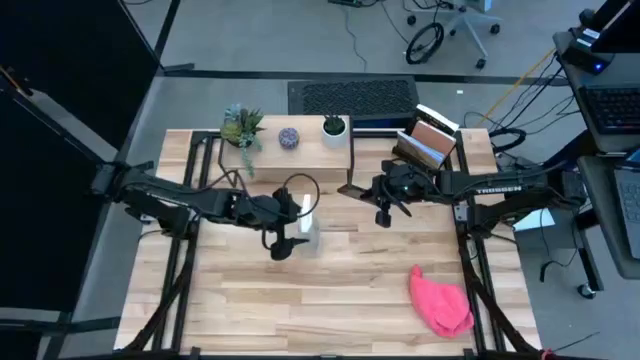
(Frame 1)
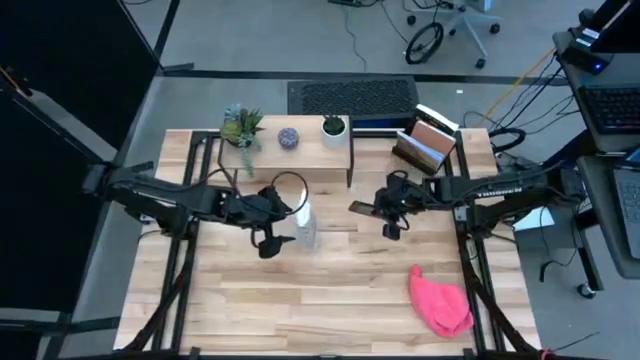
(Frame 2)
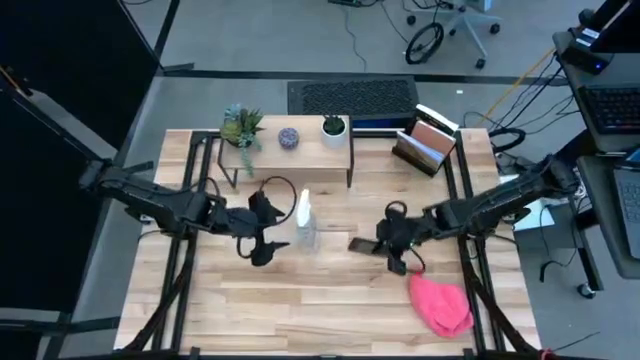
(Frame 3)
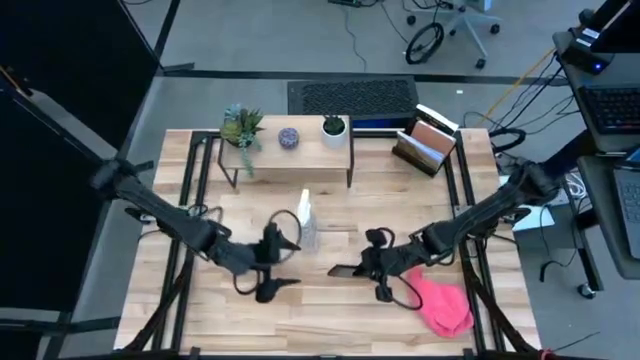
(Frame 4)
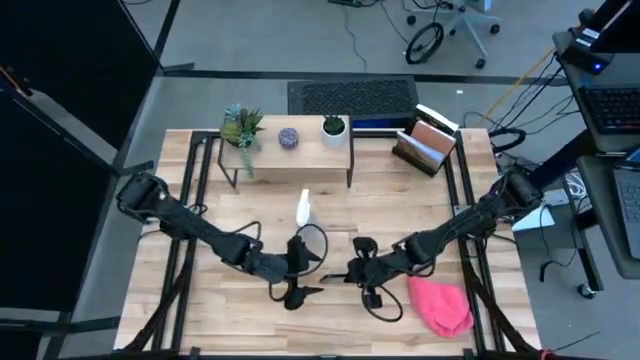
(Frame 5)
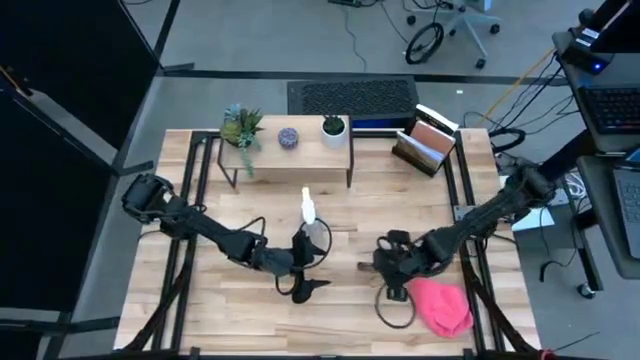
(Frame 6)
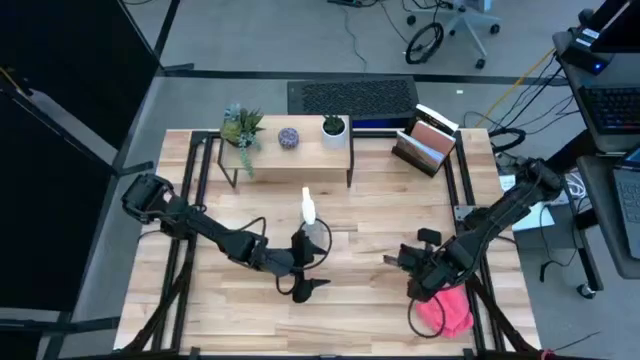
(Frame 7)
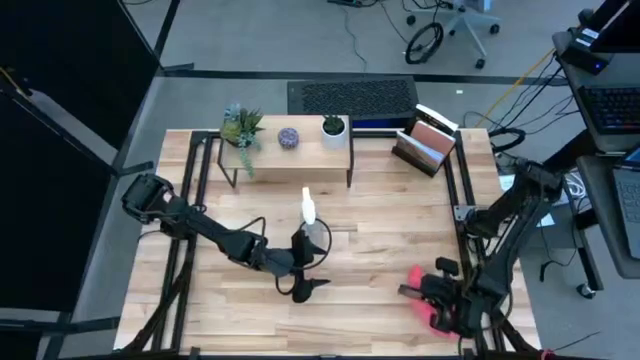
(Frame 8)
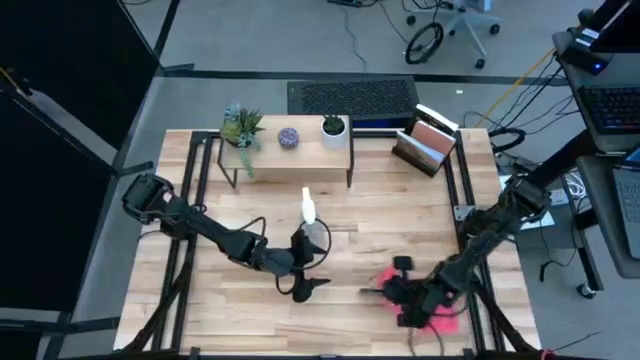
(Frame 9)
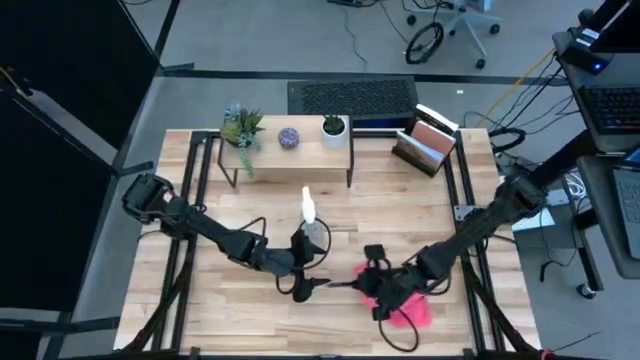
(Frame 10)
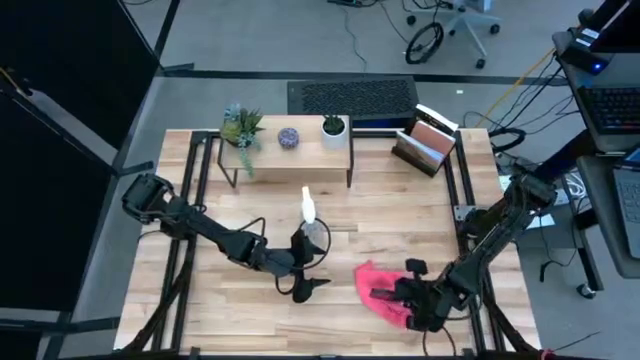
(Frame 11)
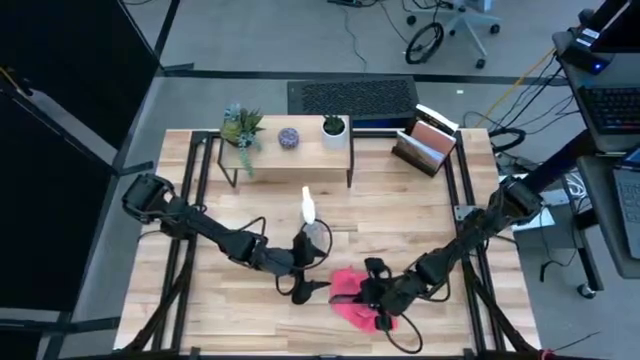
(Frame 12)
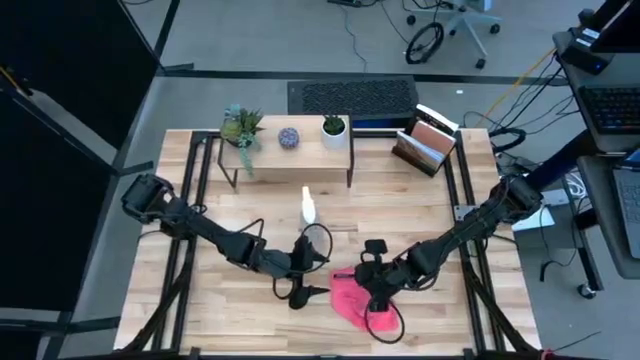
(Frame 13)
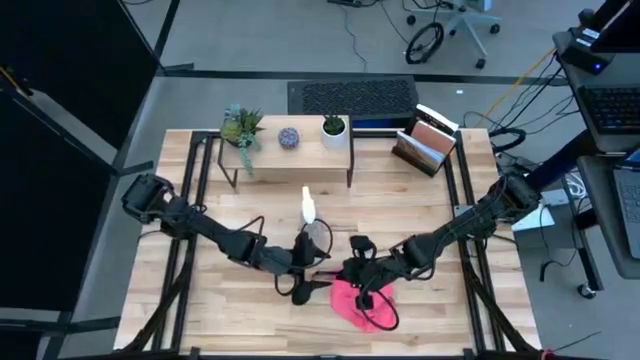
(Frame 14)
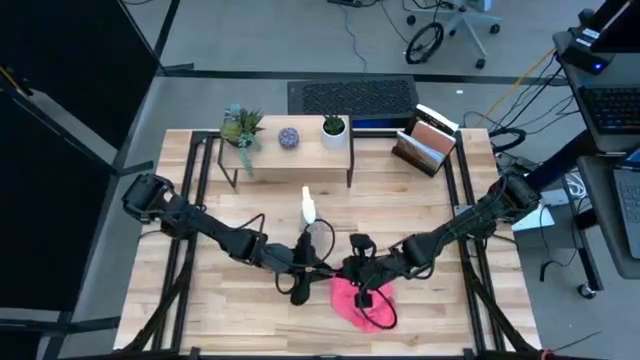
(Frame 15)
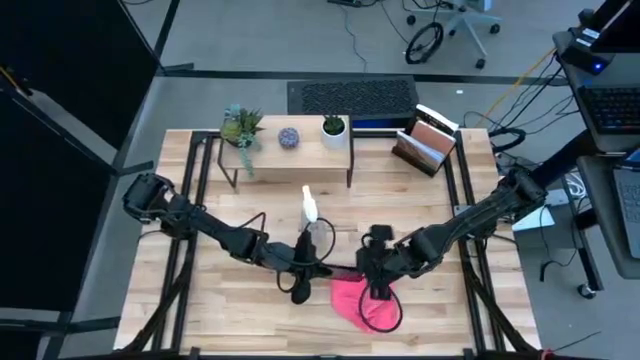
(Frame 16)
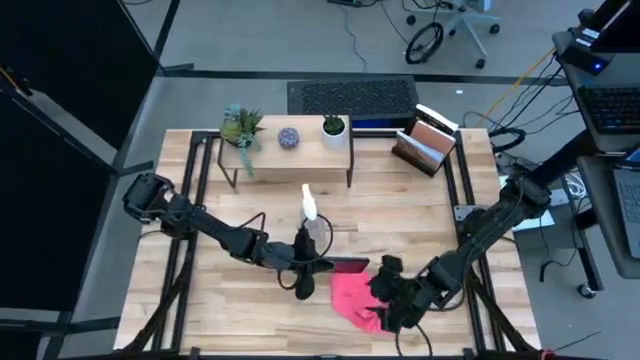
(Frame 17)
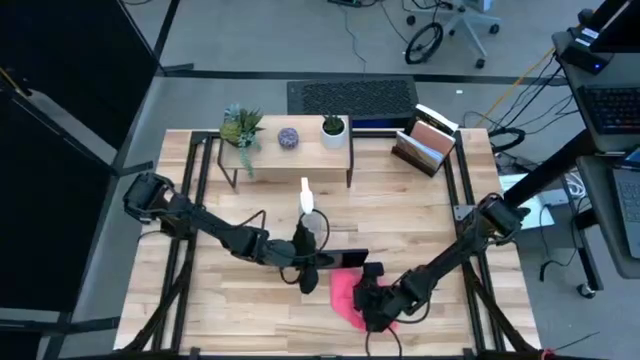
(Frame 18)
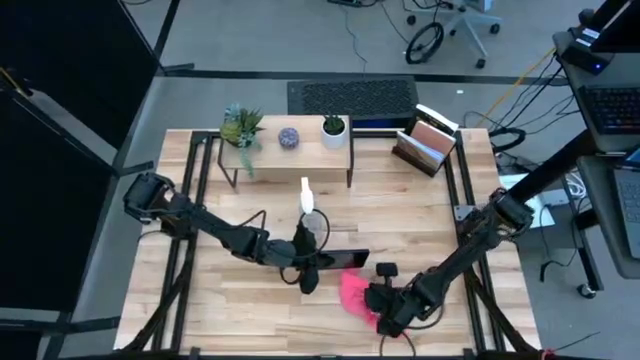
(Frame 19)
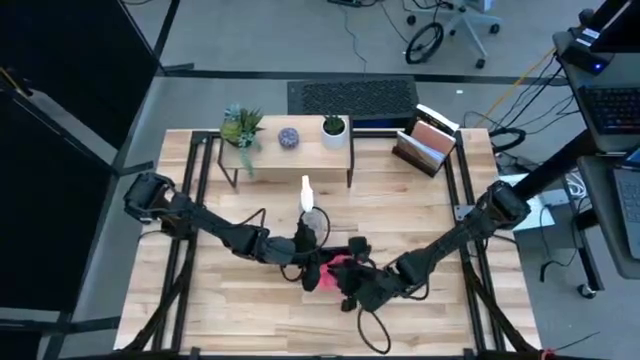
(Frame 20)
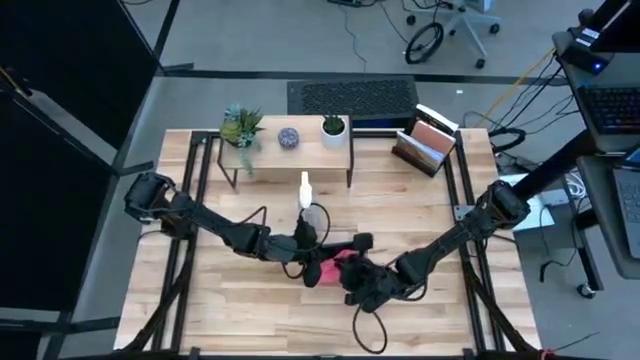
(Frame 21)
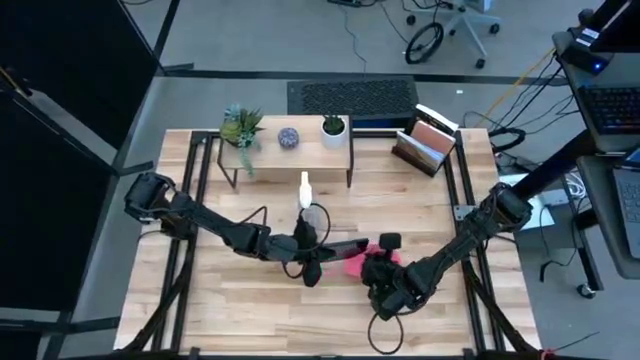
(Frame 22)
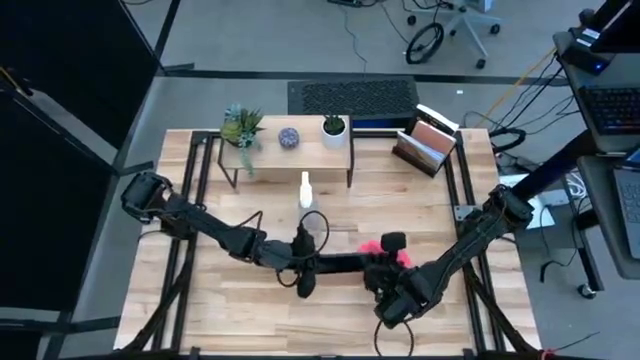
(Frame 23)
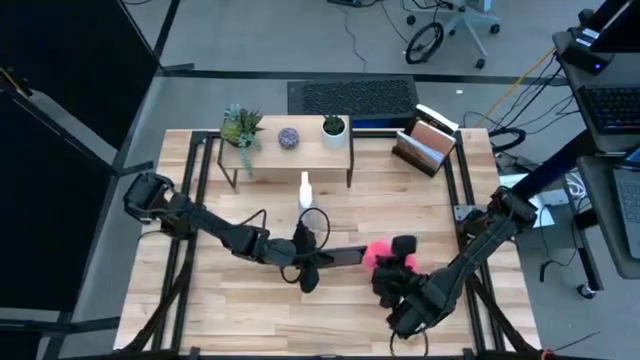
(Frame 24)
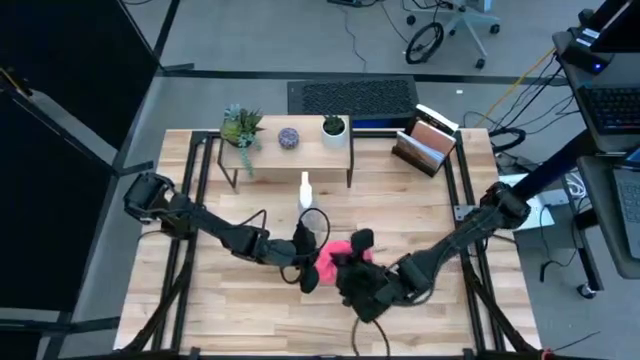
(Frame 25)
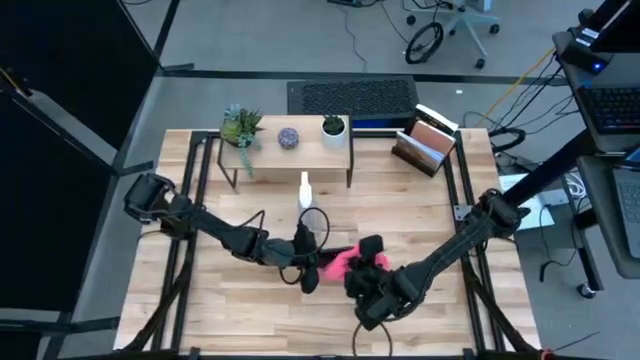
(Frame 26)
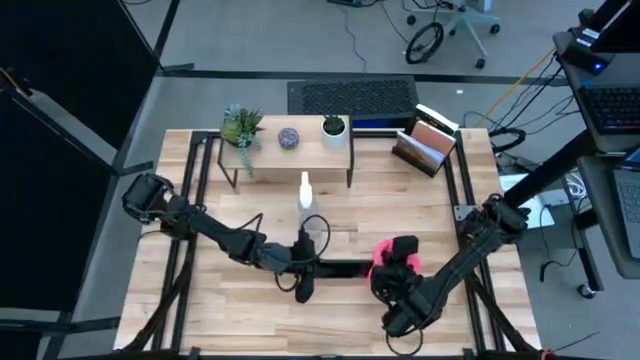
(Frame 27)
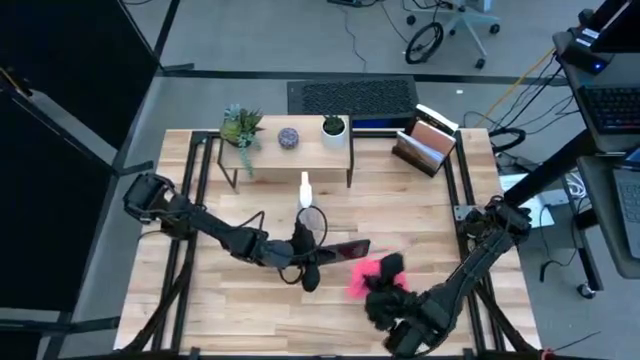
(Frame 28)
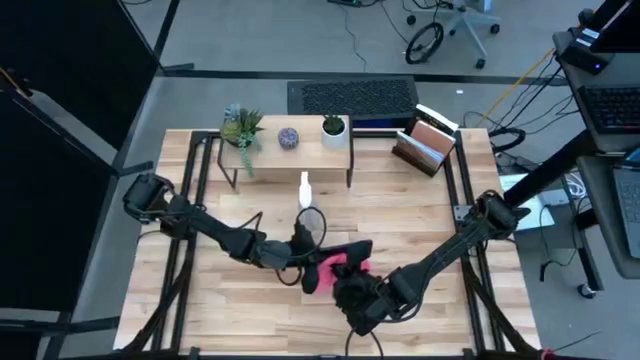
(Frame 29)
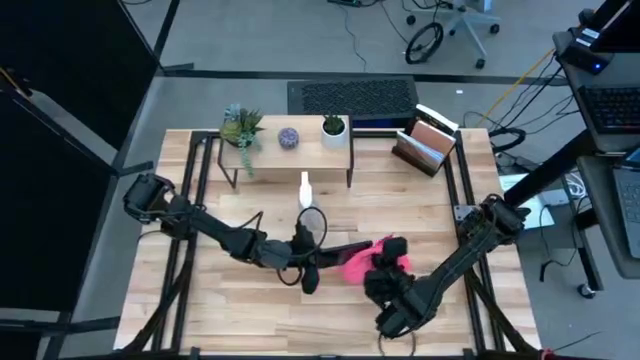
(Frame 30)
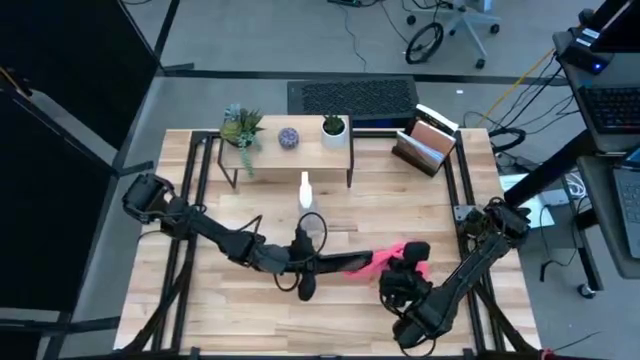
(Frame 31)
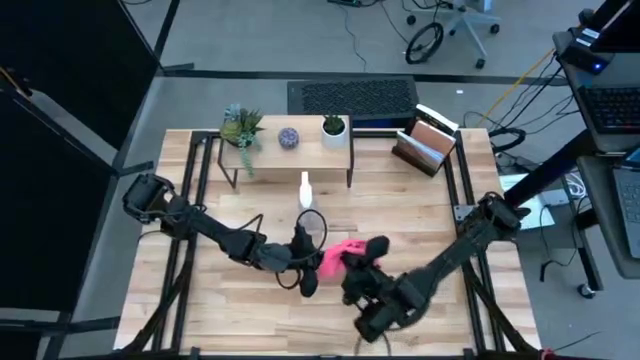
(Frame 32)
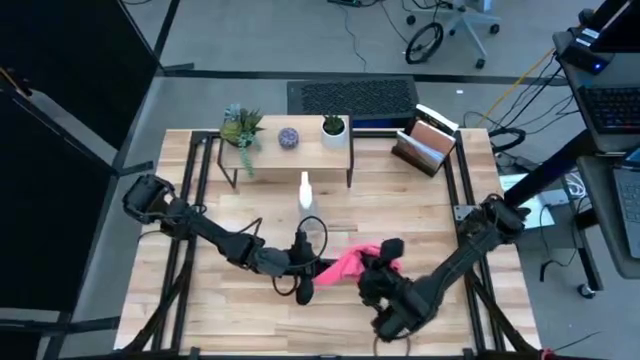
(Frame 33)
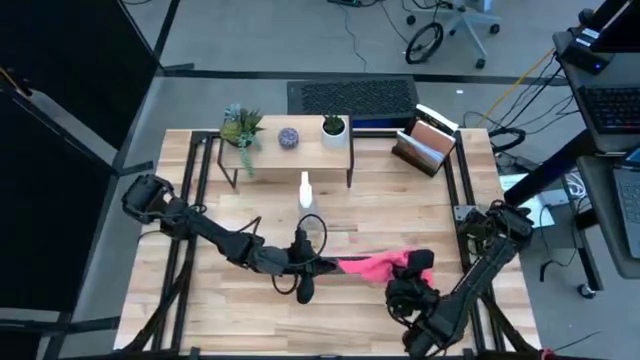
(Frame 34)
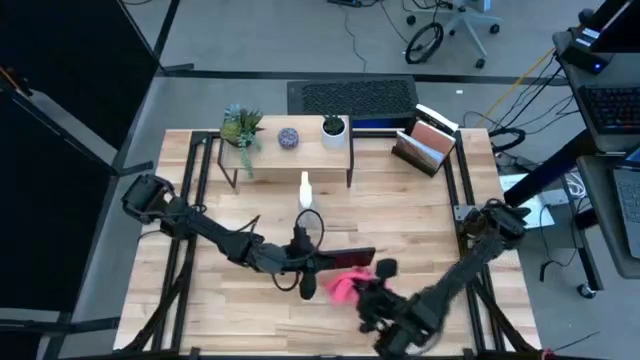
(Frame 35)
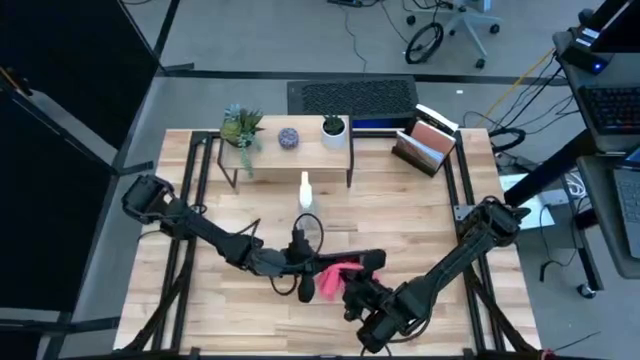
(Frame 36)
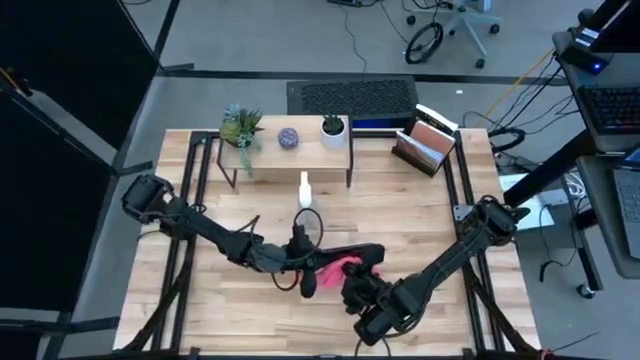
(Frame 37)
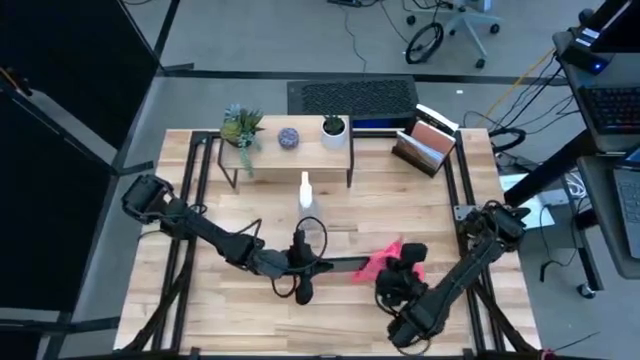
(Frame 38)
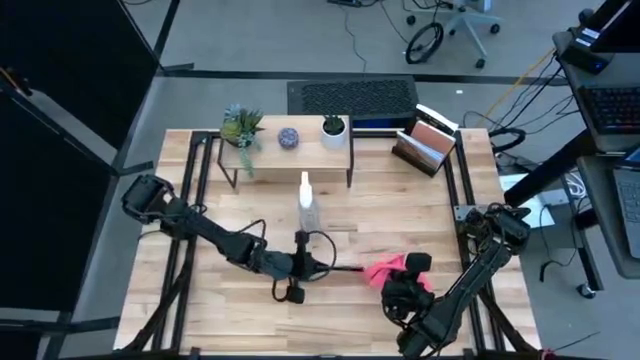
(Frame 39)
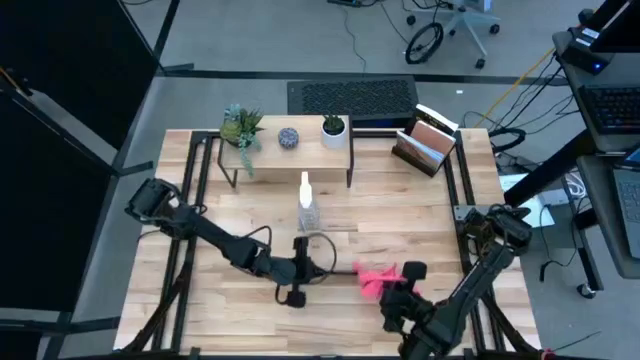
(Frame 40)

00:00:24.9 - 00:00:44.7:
Task: Apply microfiber cloth
Wipe the black cellphone with the pink microfiber cloth
